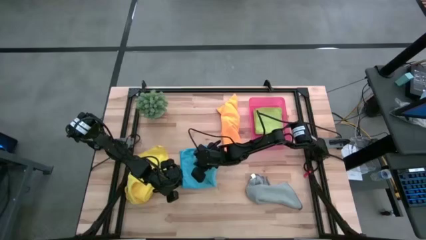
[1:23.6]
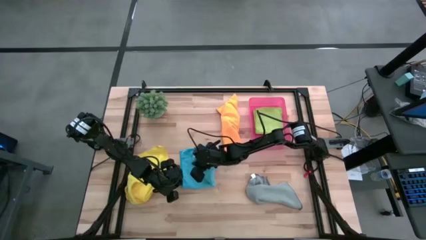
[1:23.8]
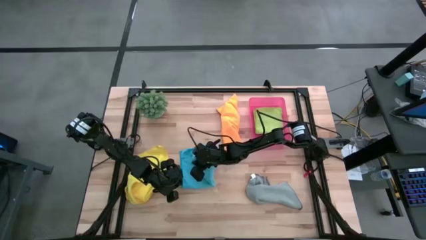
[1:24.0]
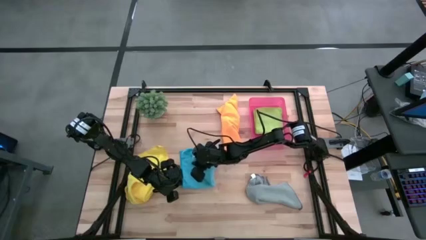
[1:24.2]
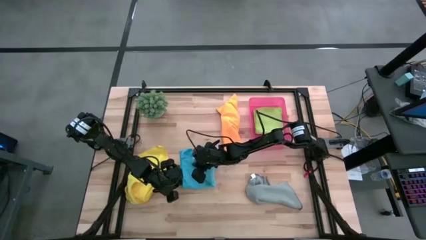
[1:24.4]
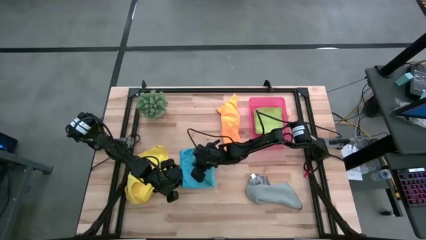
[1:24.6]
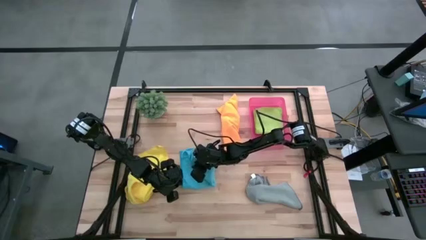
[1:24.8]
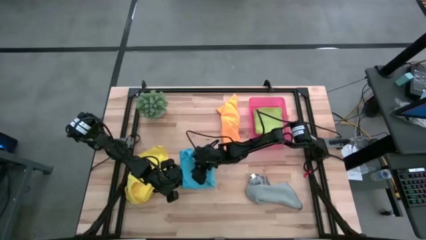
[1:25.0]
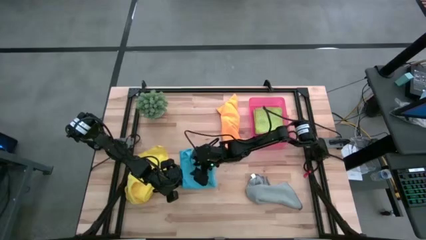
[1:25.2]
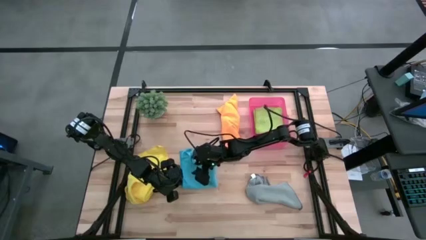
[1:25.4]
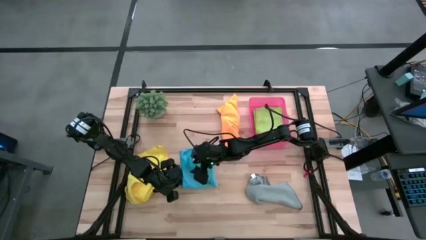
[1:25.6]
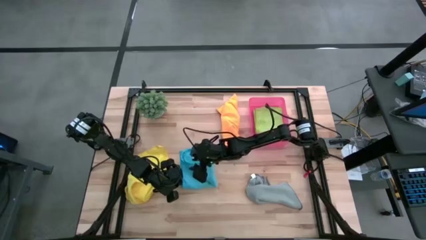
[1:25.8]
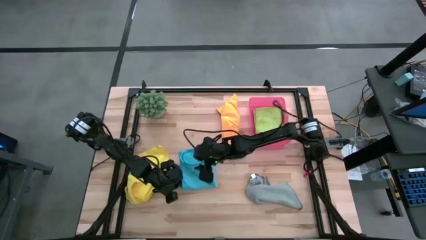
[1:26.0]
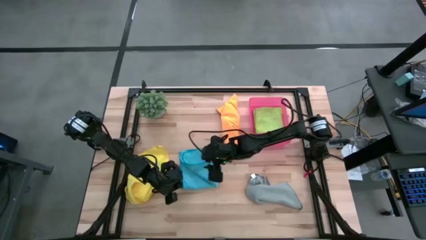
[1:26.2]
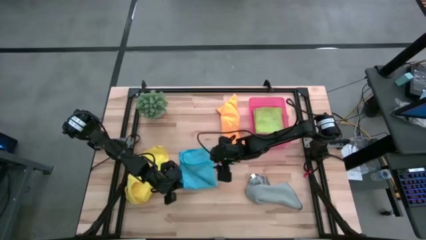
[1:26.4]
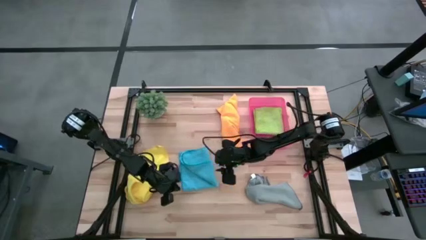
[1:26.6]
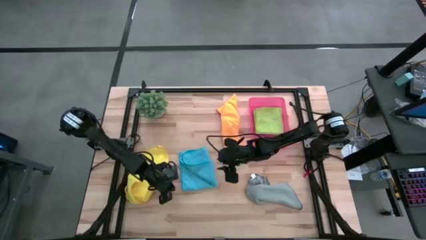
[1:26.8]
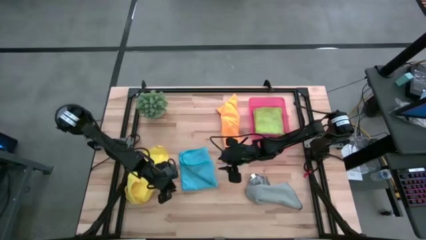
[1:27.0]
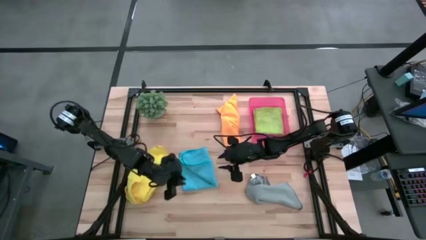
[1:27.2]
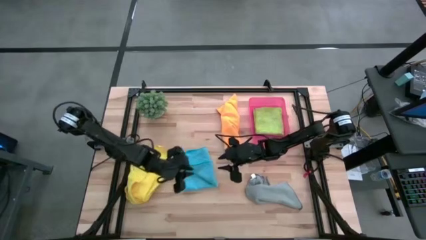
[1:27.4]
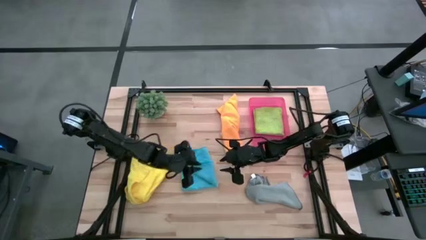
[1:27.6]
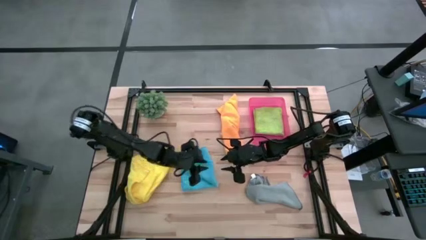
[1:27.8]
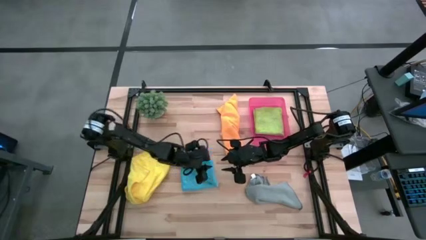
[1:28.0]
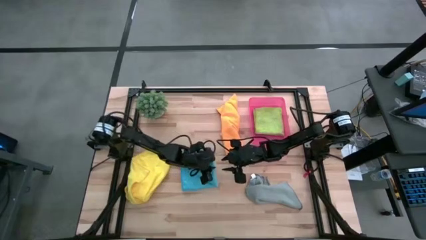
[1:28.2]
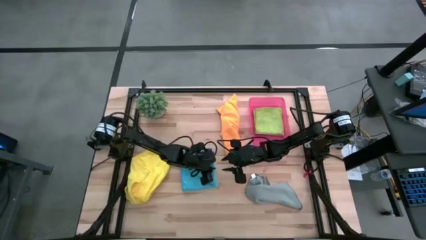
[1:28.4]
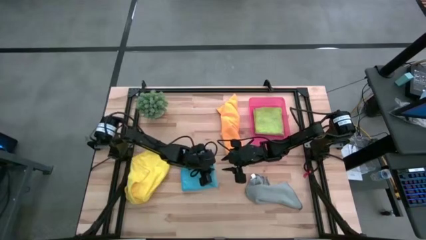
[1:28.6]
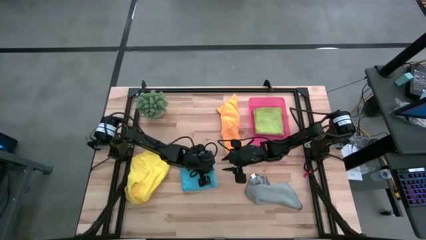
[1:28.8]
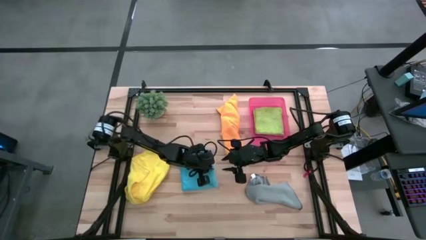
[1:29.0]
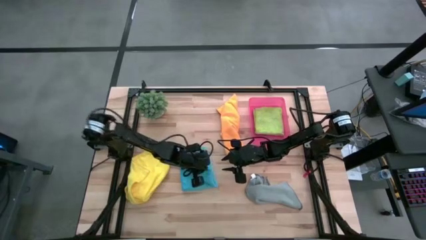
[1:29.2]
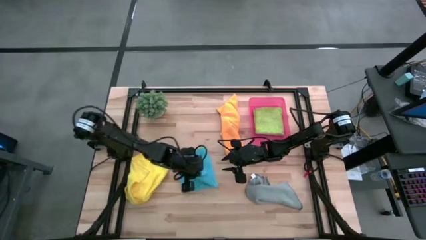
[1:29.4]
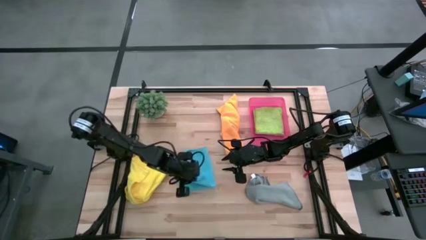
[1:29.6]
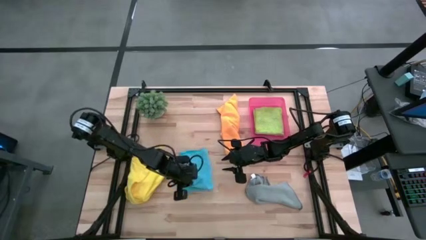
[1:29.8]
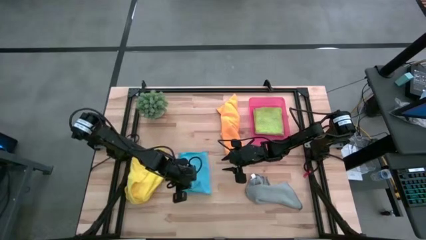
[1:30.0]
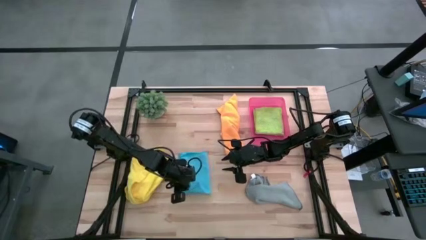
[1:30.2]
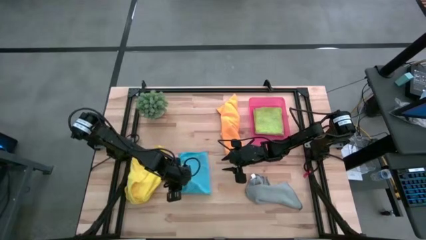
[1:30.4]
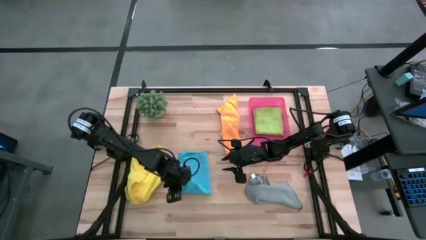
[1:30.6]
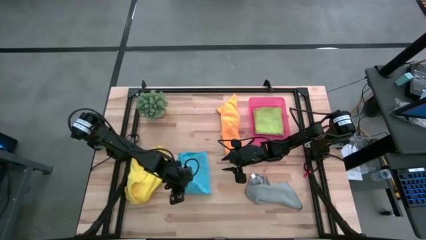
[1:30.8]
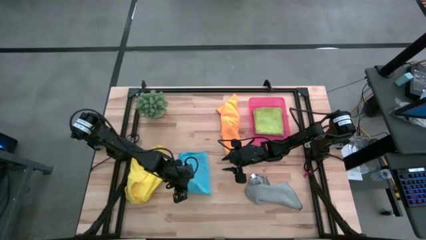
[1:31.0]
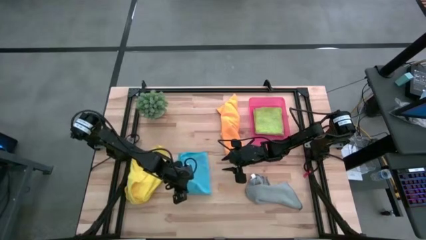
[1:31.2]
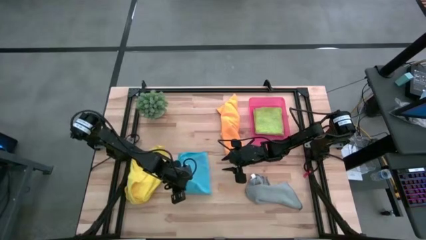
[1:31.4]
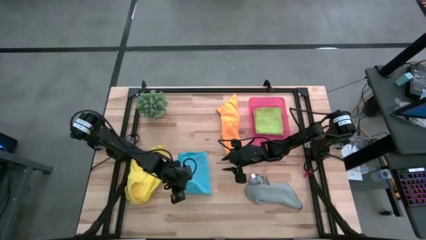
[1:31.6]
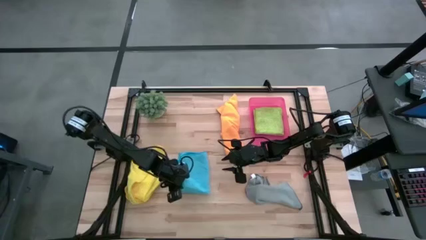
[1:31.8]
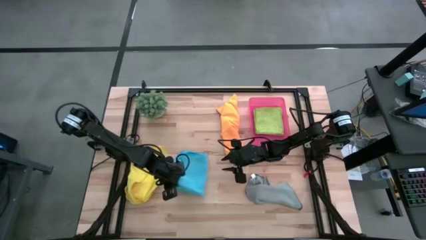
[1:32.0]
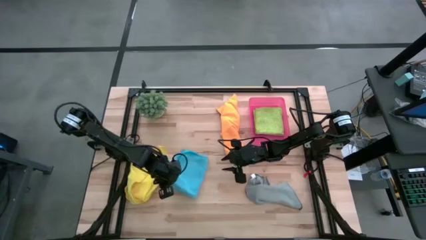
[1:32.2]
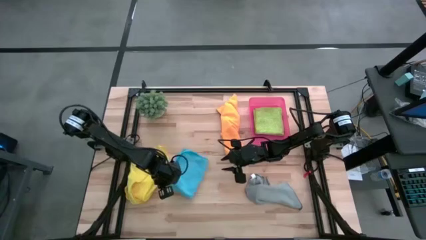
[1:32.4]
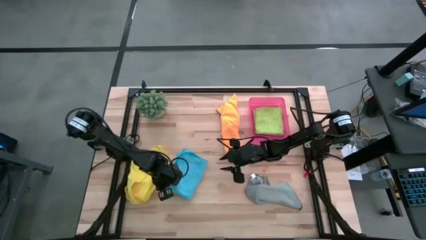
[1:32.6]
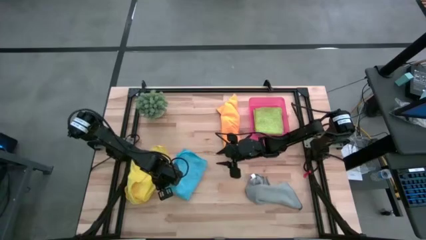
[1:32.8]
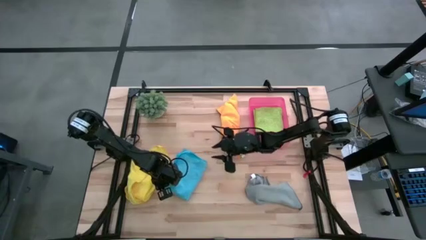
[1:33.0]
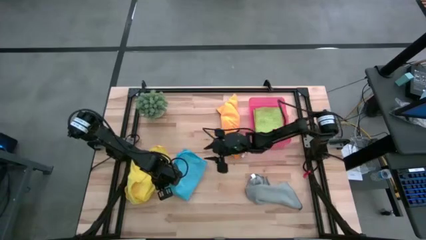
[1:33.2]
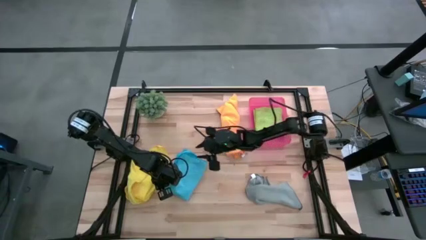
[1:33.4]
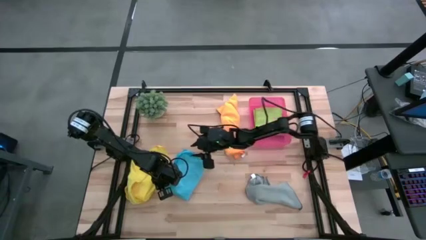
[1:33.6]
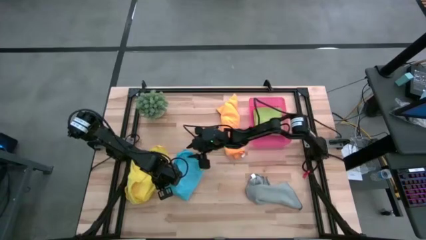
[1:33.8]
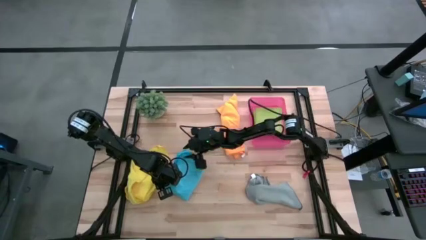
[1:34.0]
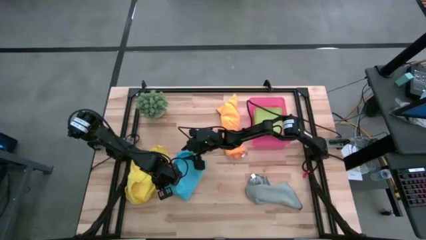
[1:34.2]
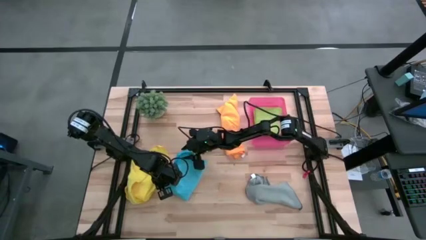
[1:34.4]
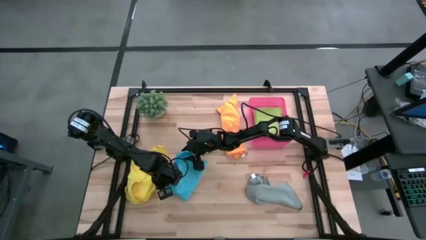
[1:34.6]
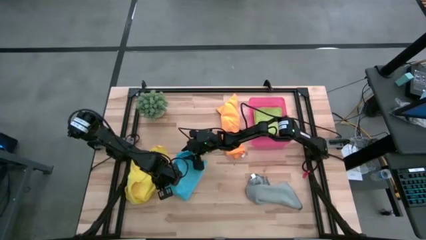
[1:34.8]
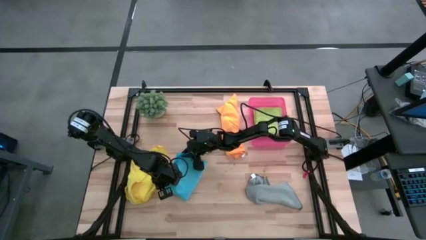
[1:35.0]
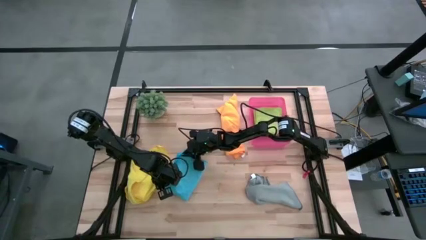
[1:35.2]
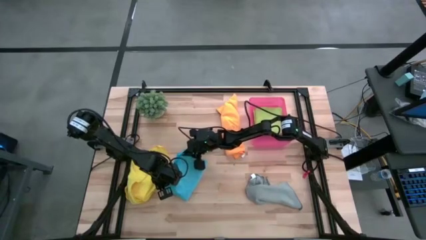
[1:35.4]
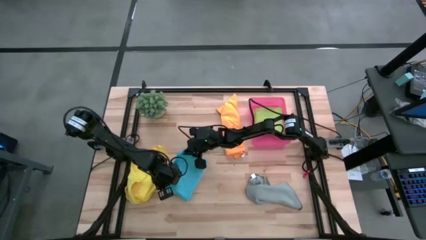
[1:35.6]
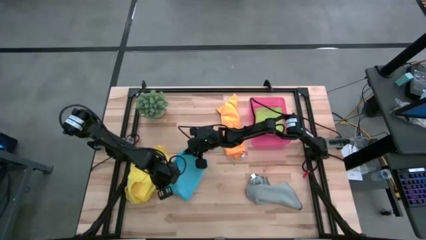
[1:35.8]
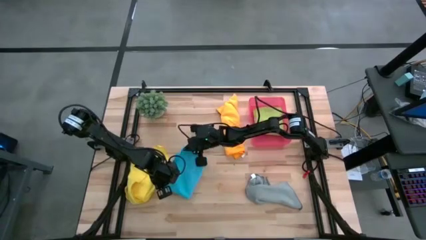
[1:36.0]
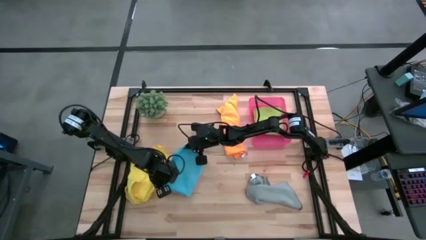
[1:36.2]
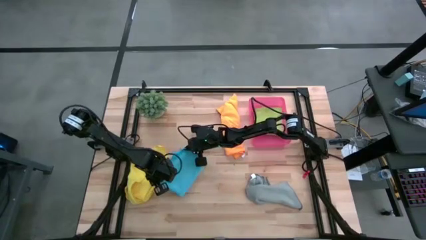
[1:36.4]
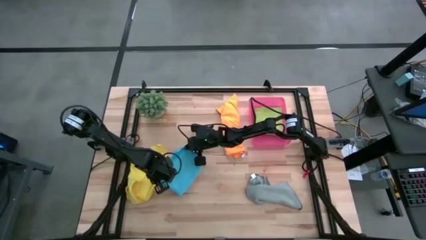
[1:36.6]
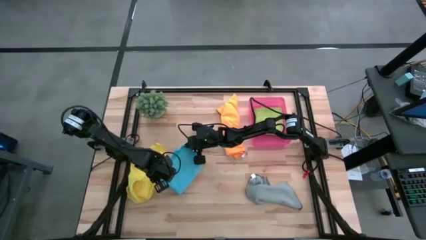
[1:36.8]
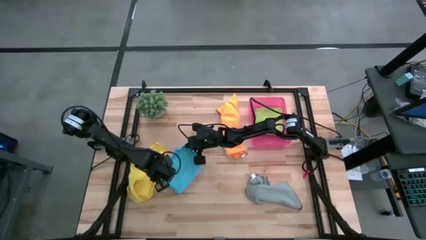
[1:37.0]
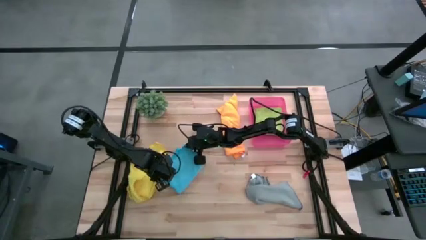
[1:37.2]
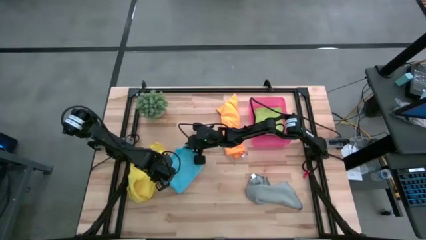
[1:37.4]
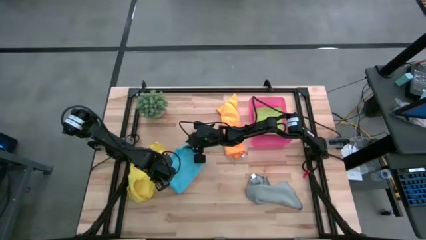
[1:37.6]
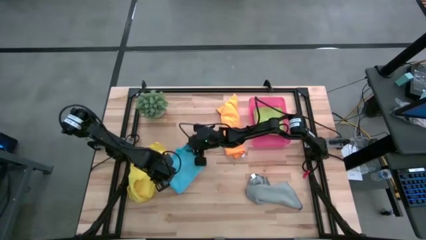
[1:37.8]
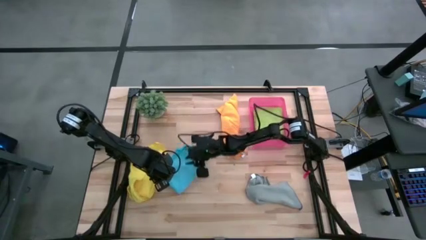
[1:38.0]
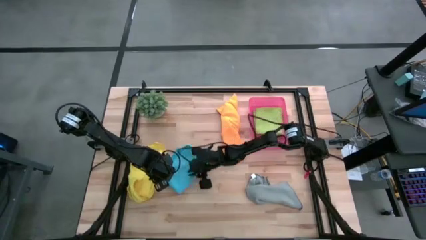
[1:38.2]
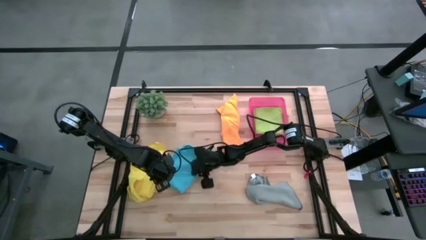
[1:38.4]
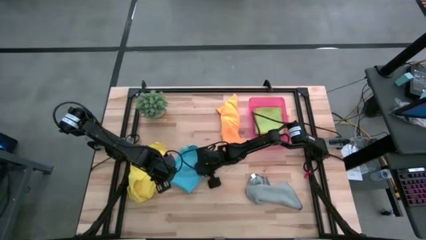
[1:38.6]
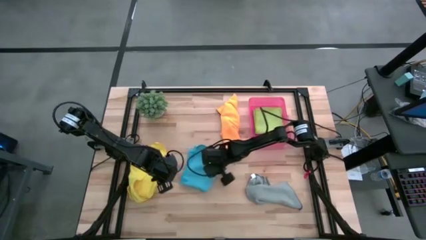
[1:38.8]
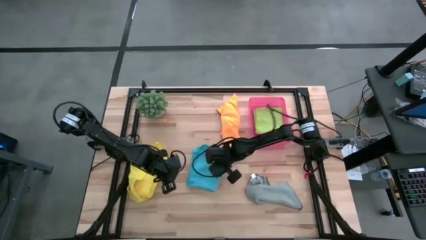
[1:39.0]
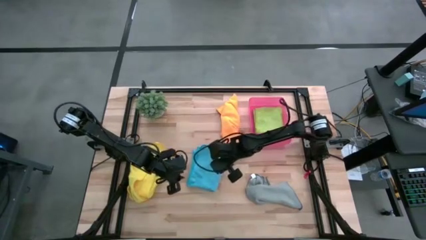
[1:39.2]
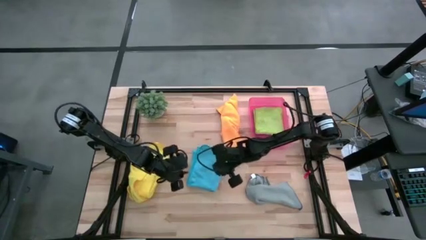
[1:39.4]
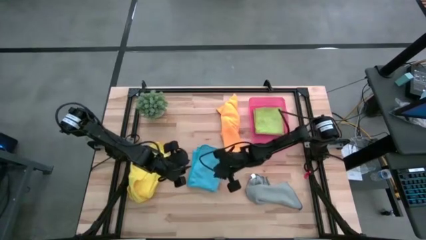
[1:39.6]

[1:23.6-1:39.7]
Task: Fold microfiber towels
Fold the blue microfiber cloth
